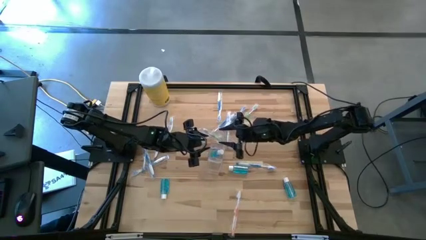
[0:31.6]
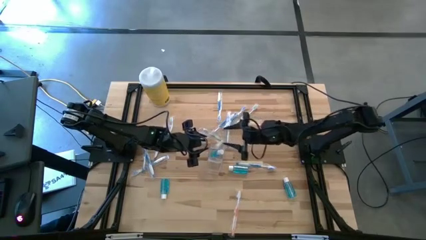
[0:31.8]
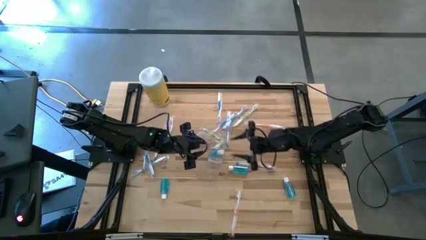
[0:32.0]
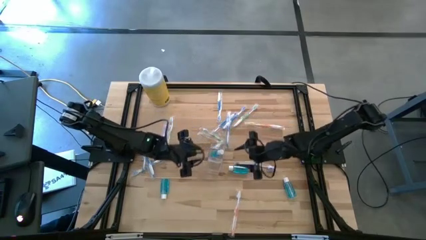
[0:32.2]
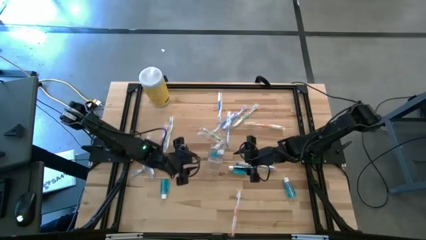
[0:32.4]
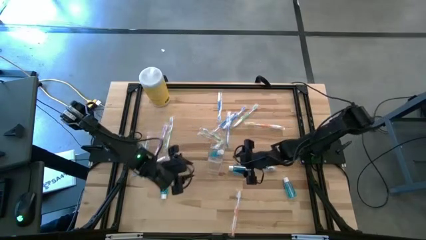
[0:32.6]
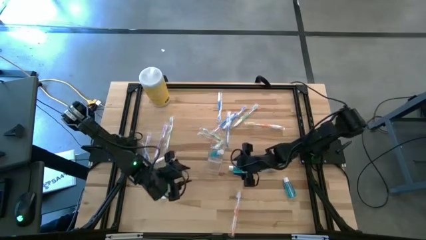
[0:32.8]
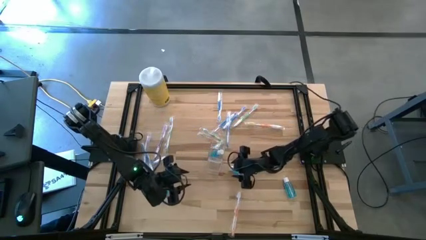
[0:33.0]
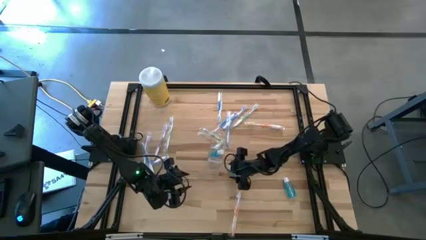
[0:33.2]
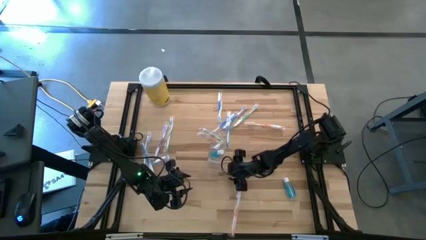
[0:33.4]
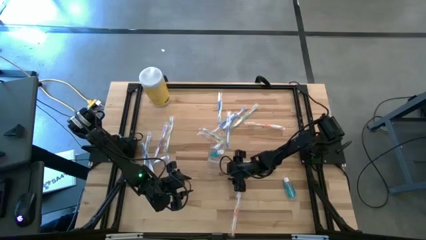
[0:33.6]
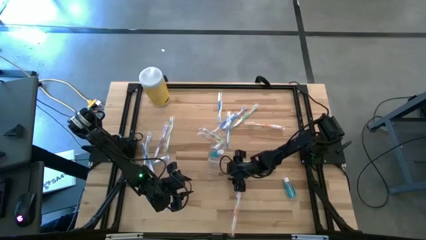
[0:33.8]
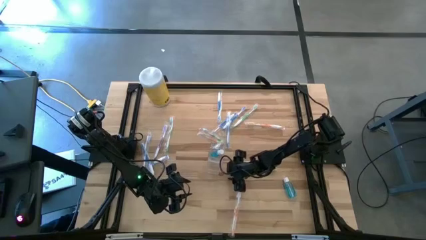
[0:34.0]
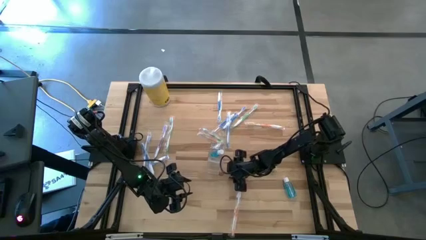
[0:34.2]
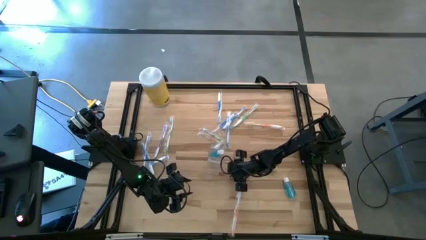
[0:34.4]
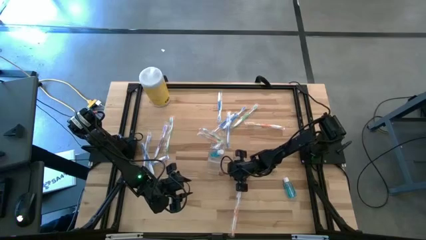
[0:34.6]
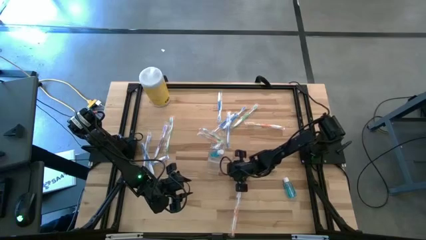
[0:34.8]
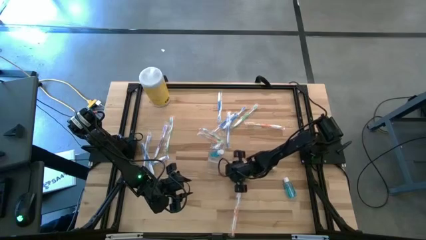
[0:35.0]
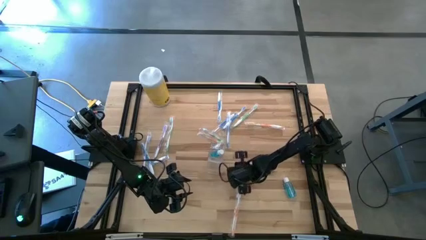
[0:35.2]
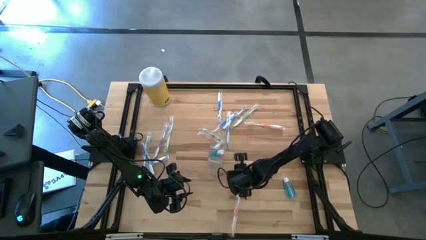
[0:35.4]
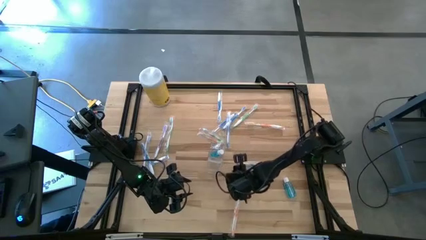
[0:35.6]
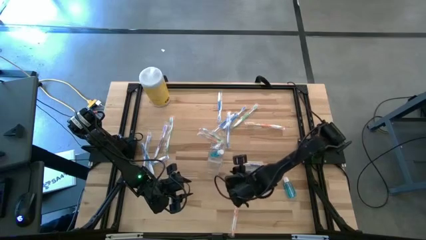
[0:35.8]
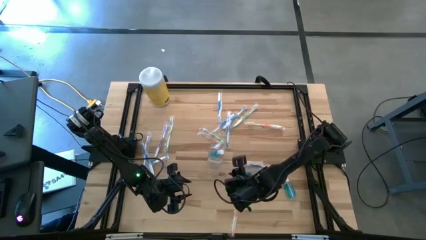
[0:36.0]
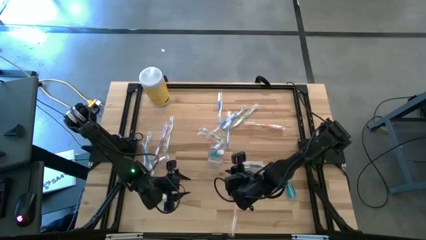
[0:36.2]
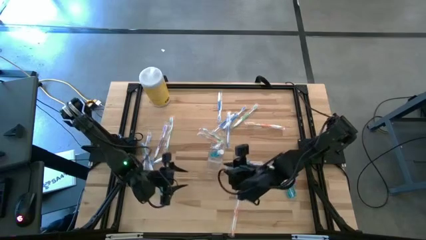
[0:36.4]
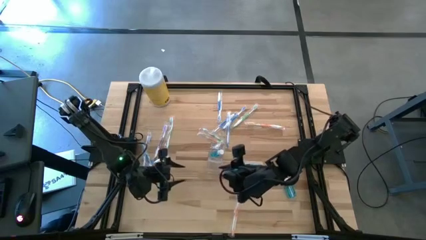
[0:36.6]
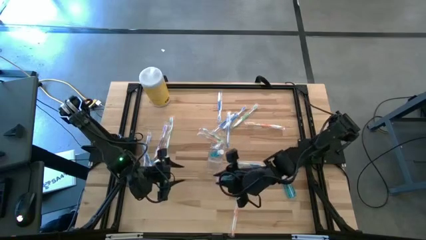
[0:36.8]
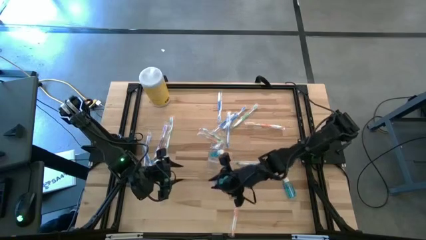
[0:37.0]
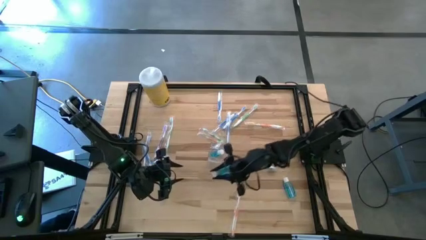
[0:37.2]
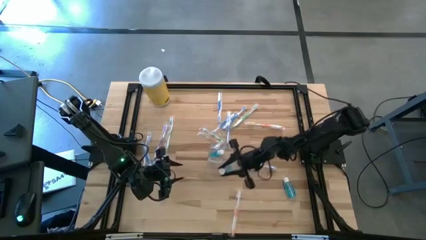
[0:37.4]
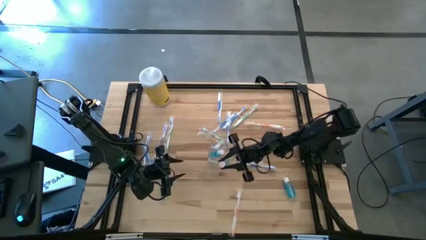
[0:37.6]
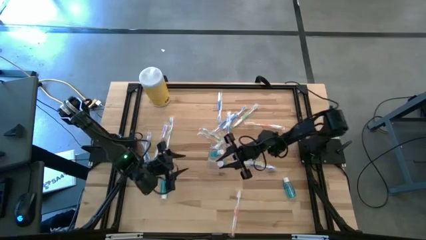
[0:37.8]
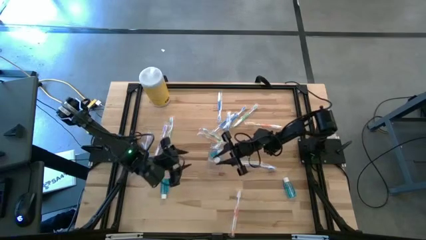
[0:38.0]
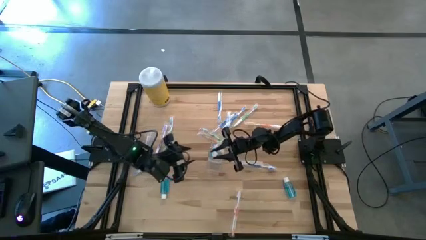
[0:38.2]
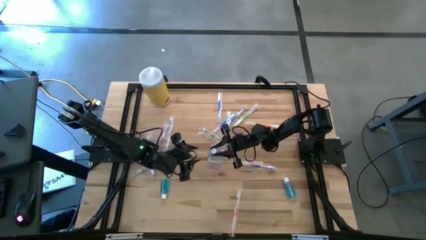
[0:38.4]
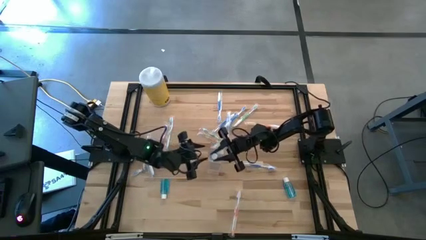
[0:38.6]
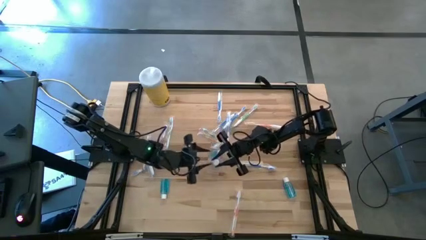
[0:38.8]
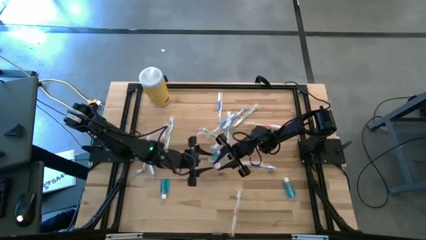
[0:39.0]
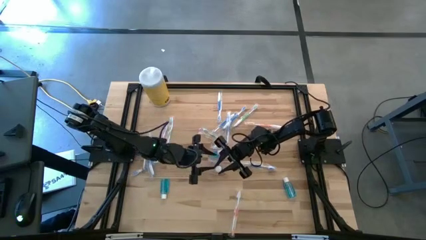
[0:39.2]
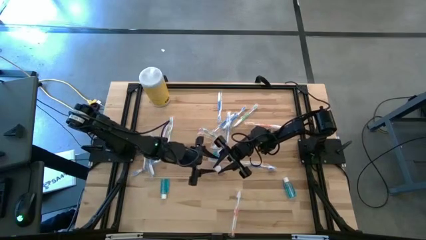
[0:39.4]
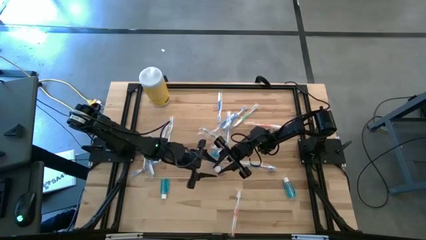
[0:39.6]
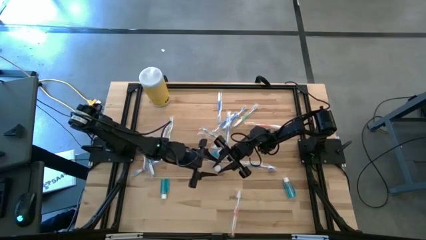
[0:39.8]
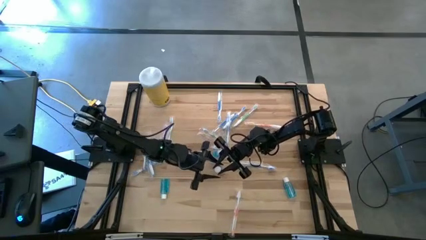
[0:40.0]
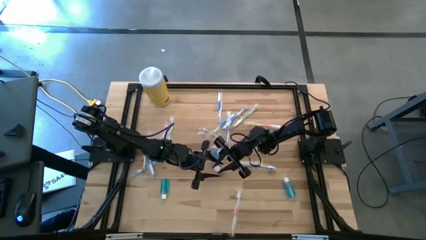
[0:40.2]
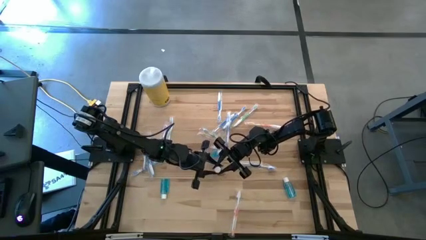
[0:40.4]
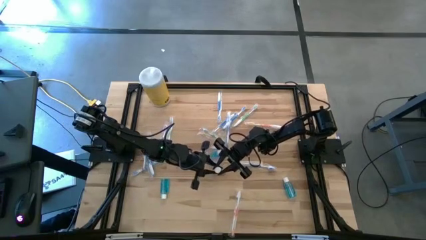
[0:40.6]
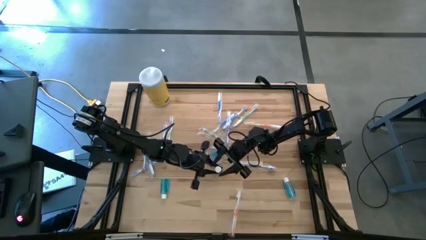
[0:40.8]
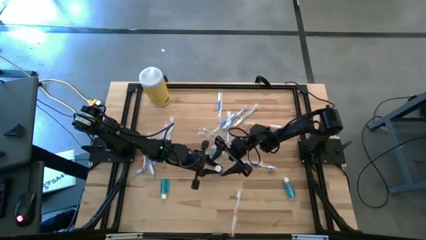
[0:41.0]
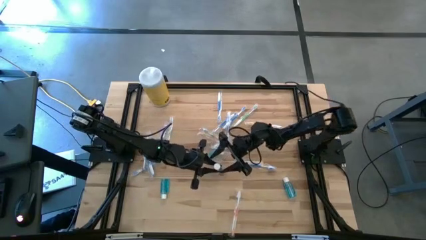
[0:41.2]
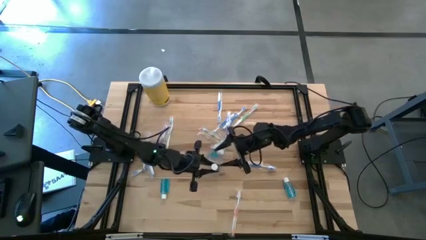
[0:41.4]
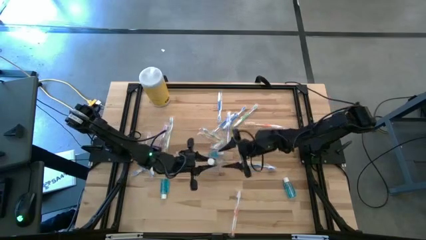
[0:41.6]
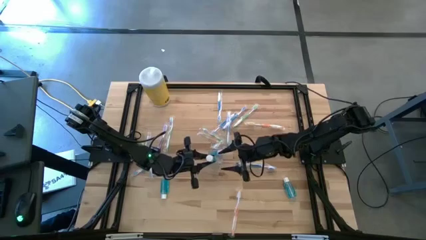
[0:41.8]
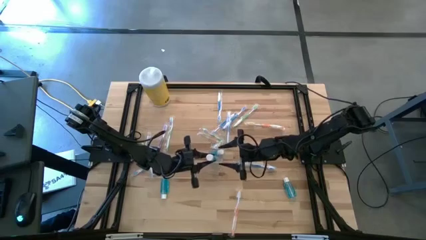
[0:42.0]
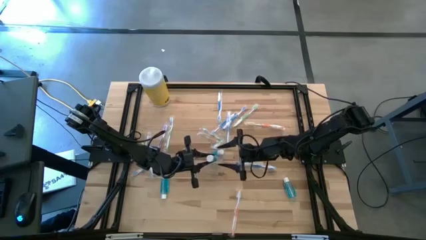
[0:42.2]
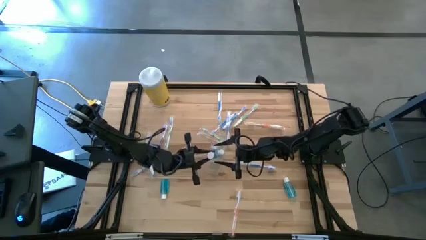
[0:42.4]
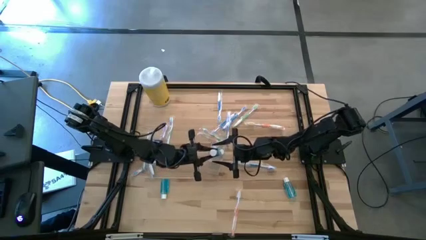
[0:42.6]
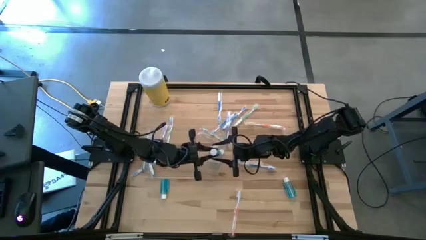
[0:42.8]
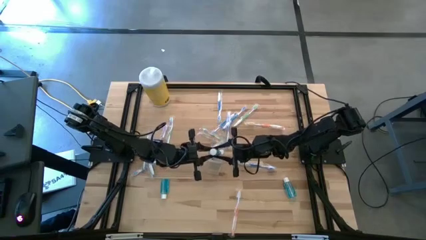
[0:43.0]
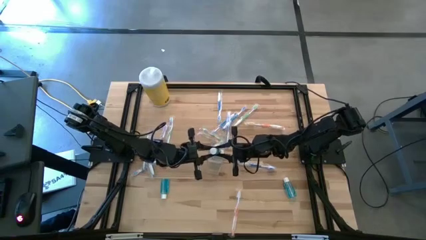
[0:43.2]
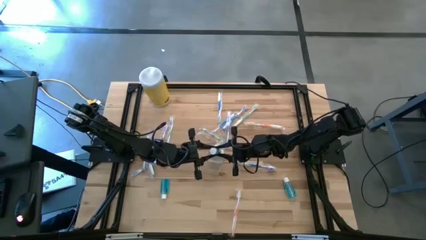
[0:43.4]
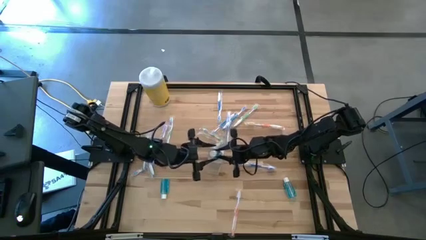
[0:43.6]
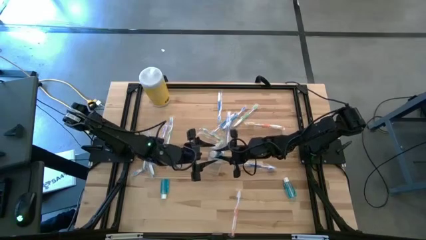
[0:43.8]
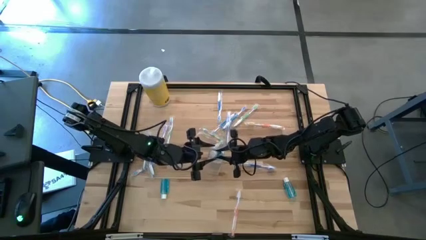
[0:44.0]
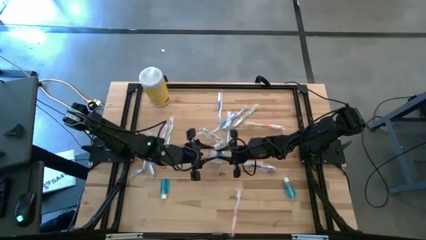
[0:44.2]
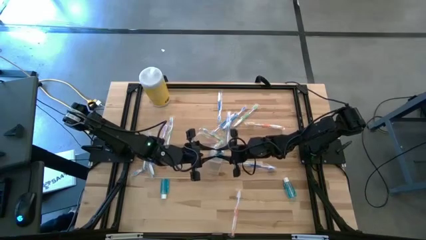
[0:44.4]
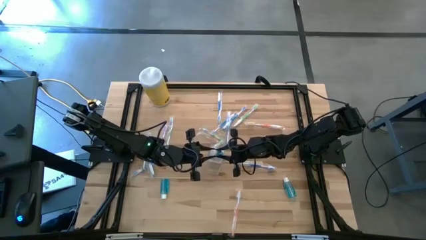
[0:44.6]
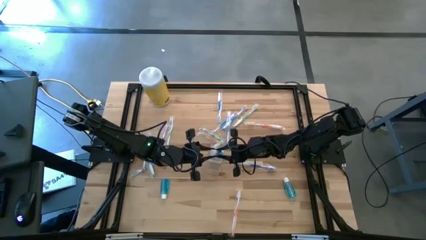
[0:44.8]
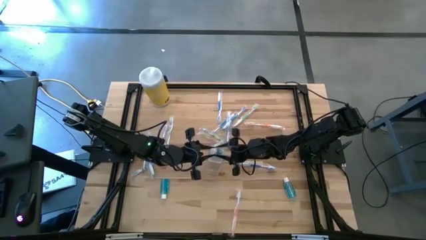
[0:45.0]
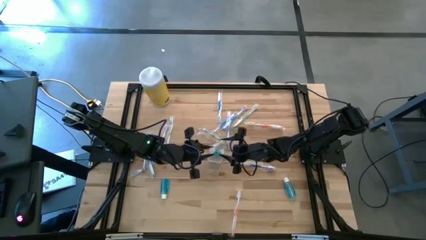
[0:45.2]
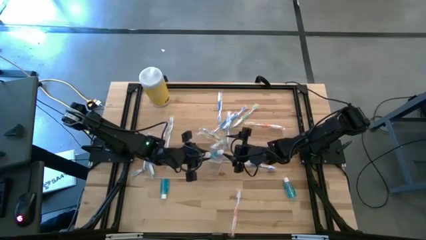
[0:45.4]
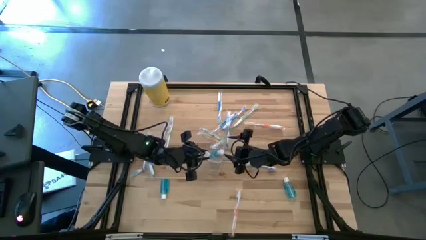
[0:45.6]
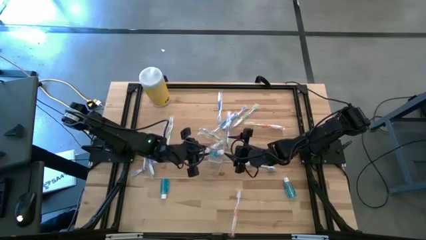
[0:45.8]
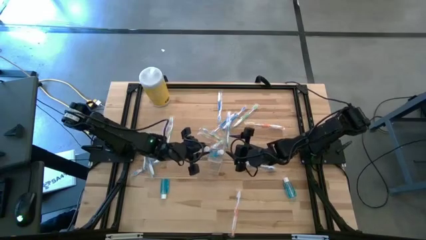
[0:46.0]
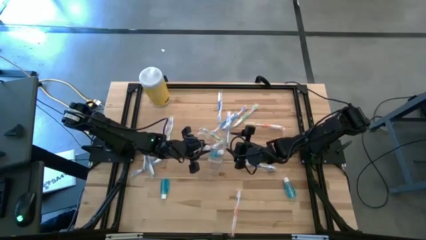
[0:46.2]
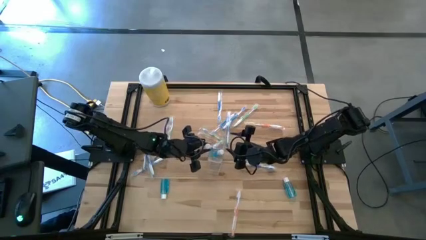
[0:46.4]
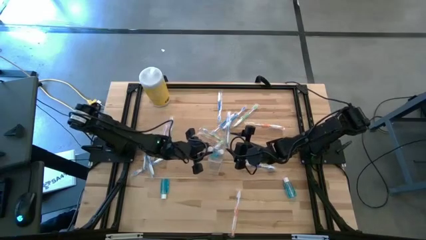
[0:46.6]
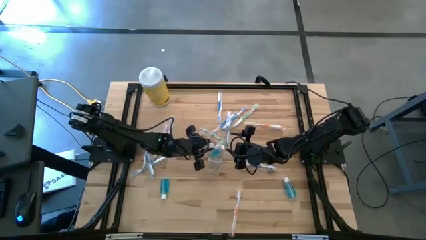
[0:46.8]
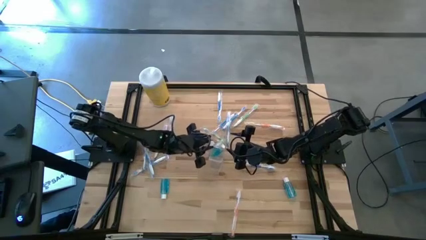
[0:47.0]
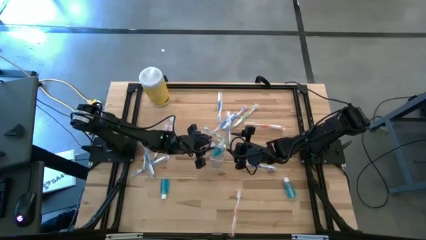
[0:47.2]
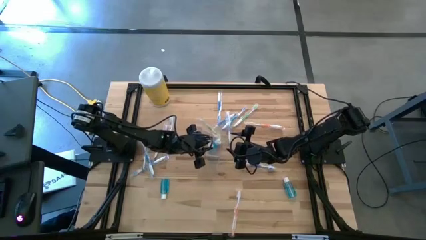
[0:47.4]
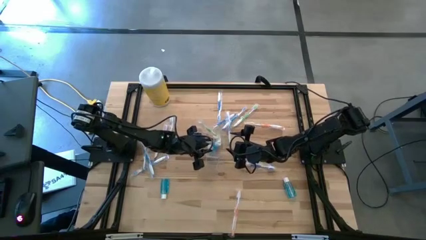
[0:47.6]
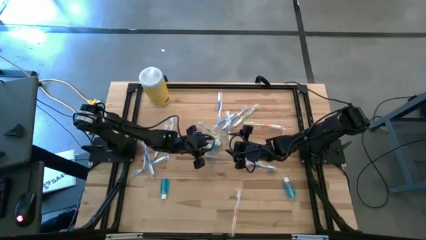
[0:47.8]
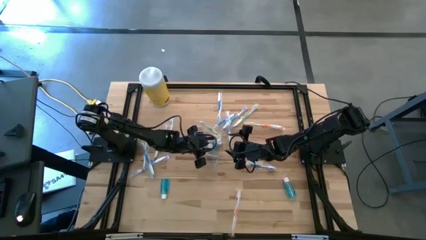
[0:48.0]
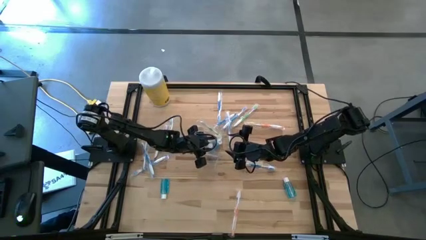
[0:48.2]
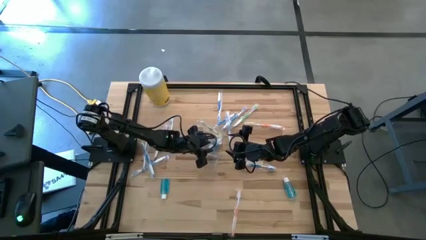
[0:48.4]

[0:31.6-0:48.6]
Task: Pick & Place toothbrushing station
Put the blue mouthwash into the transparent organizer
